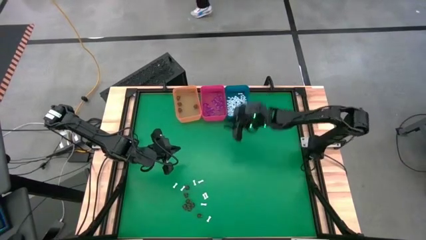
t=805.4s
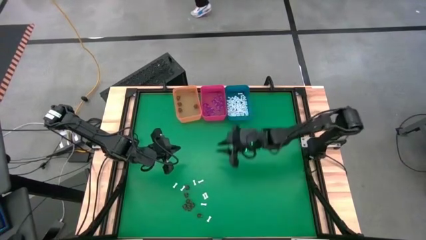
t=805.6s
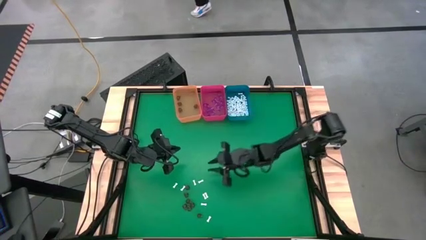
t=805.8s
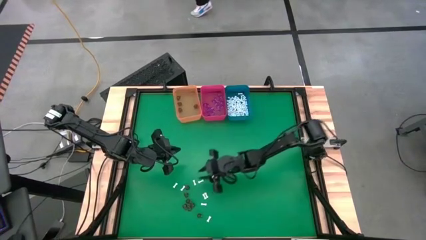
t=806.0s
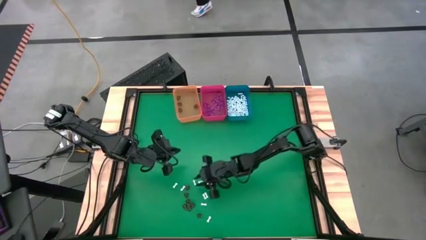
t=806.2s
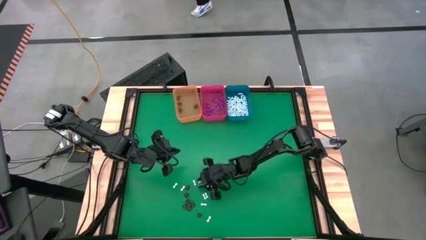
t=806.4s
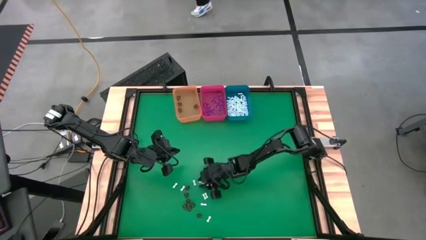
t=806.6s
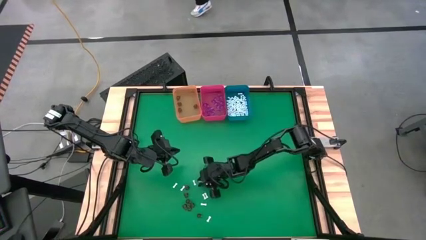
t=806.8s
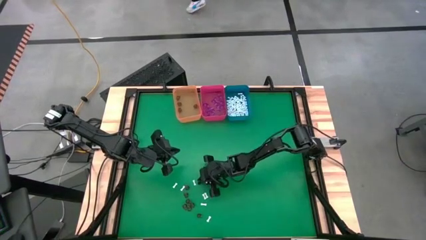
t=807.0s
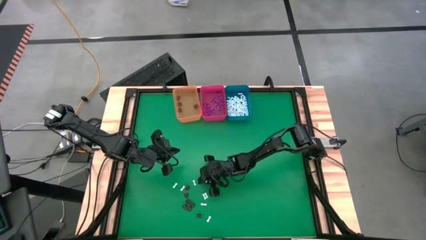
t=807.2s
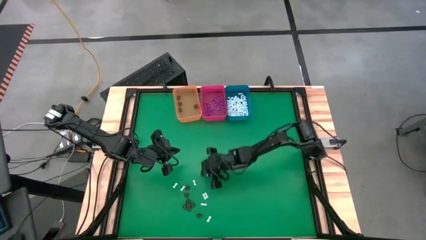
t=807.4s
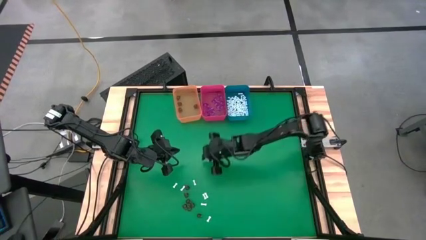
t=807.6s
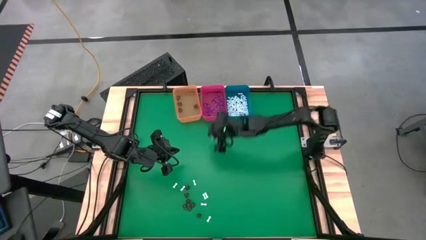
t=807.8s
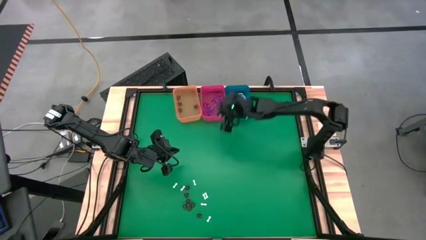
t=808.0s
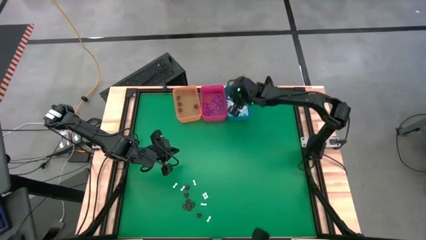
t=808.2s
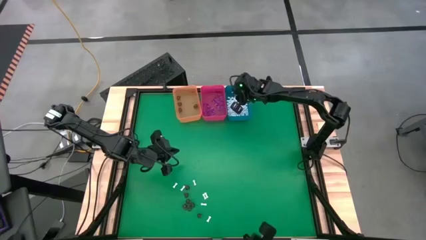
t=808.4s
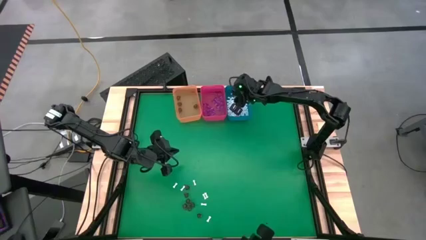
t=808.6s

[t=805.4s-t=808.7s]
Task: Sort Halloween decoration
Put the white bone toy into the blue bin

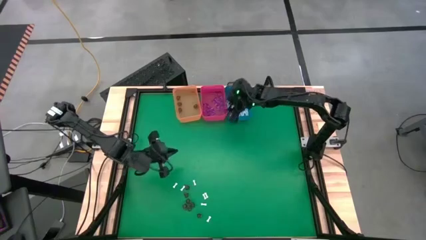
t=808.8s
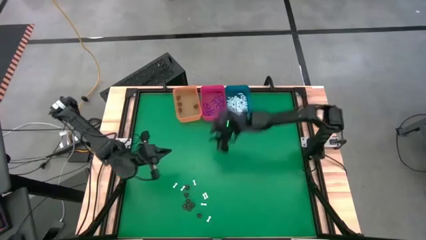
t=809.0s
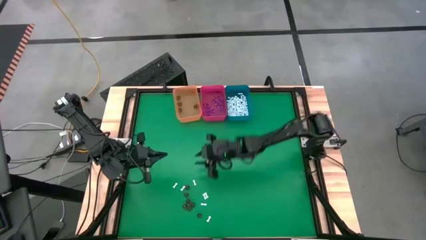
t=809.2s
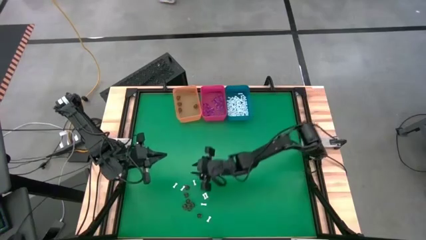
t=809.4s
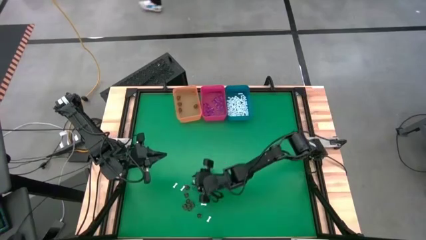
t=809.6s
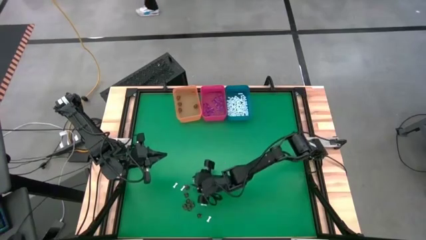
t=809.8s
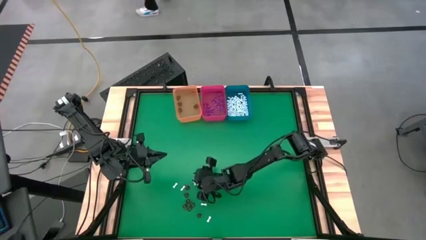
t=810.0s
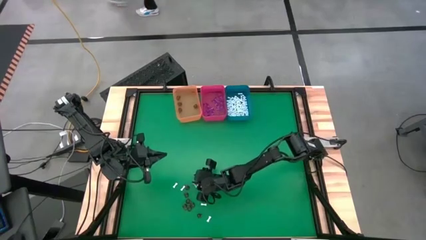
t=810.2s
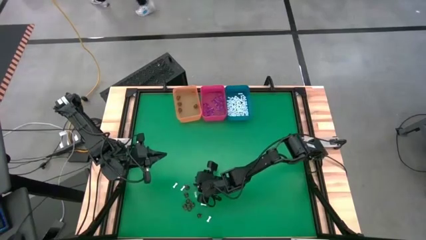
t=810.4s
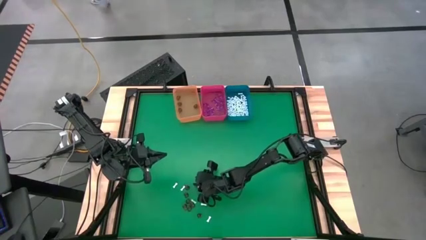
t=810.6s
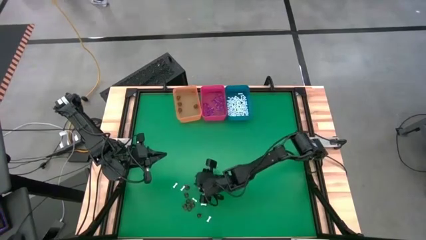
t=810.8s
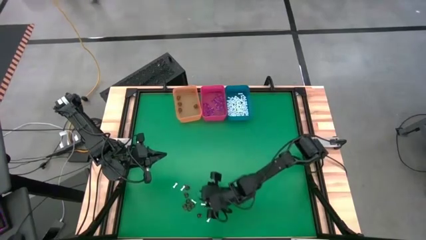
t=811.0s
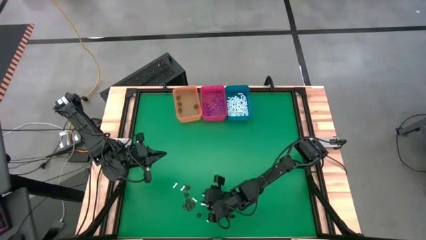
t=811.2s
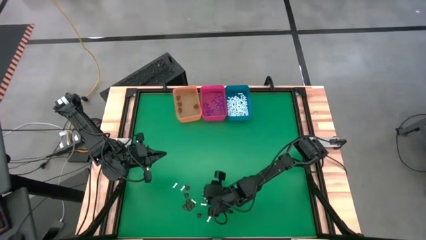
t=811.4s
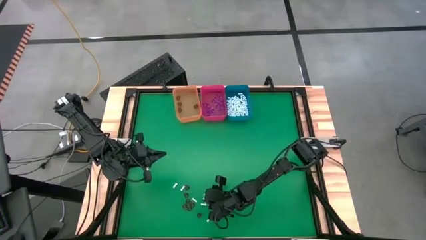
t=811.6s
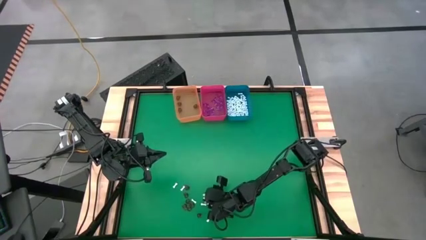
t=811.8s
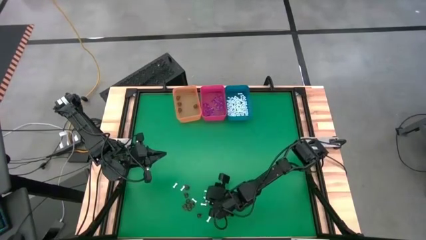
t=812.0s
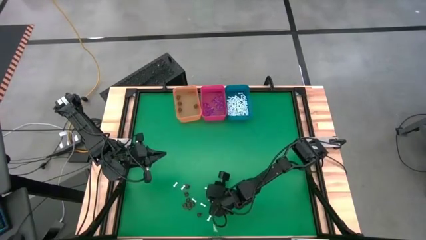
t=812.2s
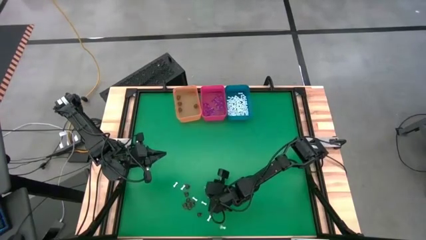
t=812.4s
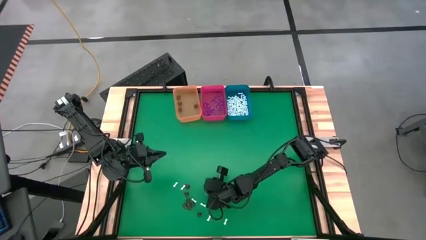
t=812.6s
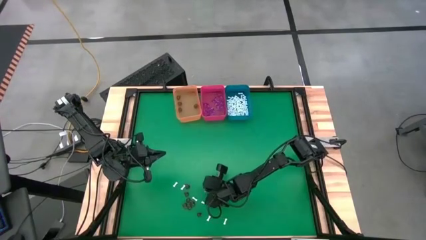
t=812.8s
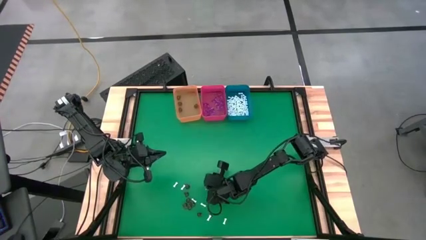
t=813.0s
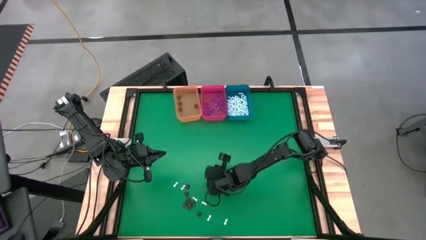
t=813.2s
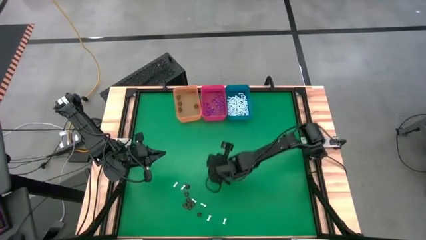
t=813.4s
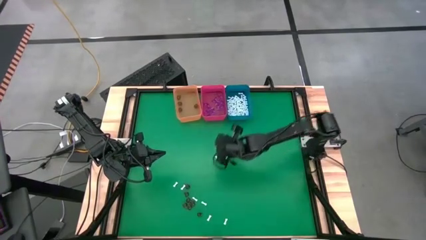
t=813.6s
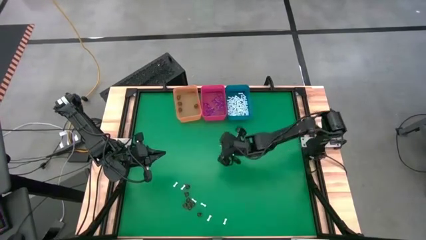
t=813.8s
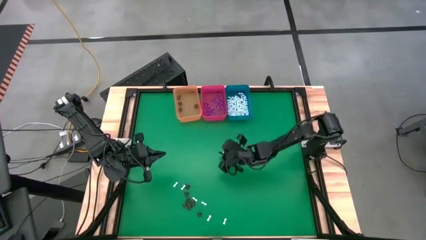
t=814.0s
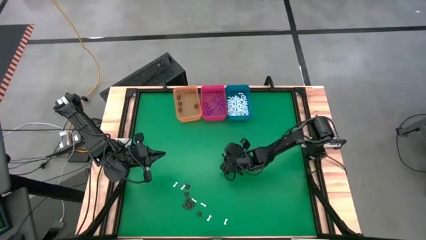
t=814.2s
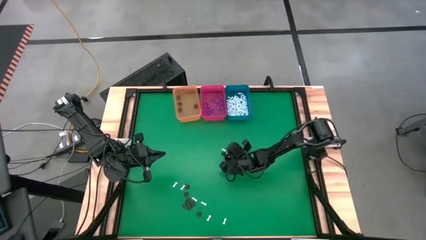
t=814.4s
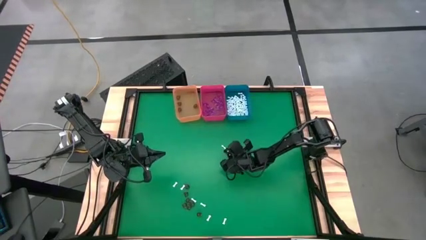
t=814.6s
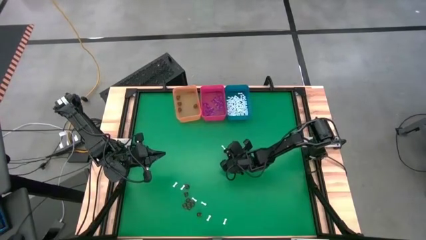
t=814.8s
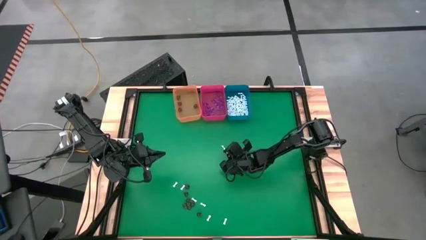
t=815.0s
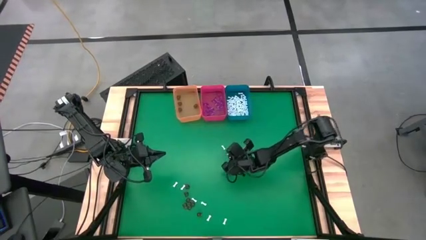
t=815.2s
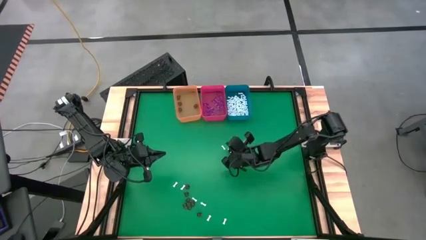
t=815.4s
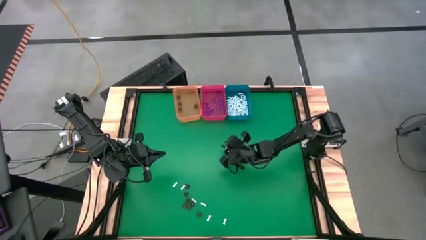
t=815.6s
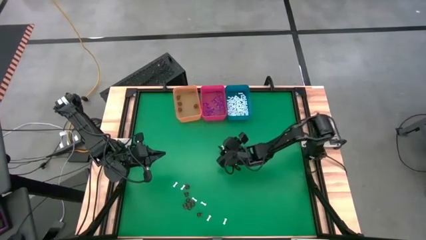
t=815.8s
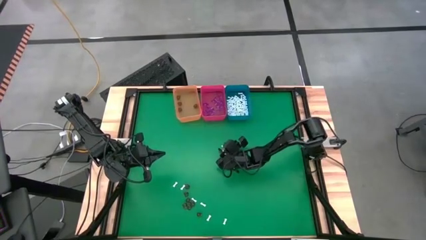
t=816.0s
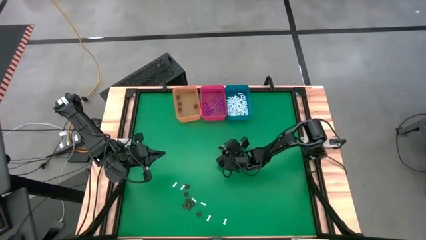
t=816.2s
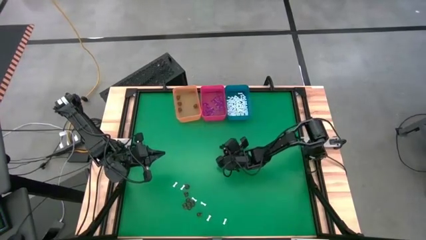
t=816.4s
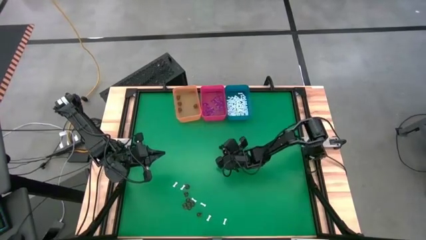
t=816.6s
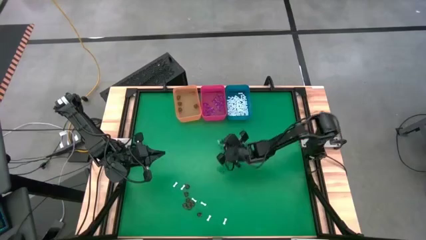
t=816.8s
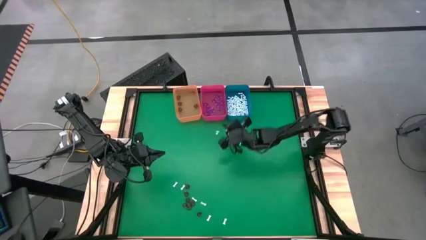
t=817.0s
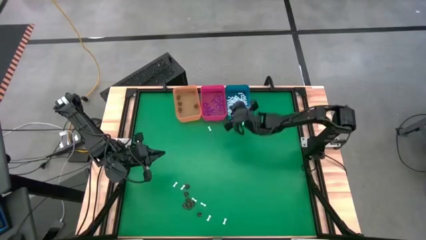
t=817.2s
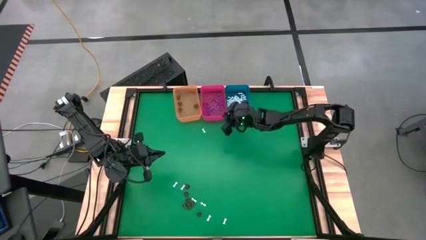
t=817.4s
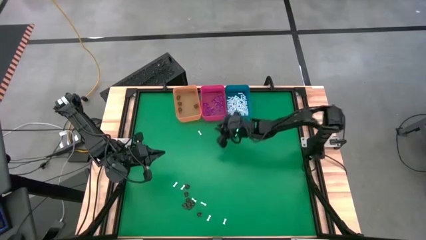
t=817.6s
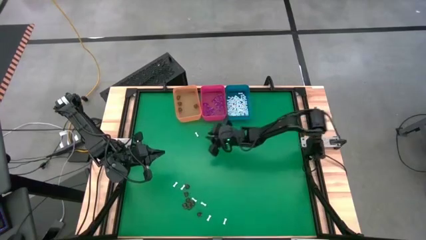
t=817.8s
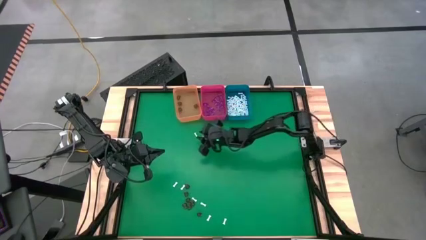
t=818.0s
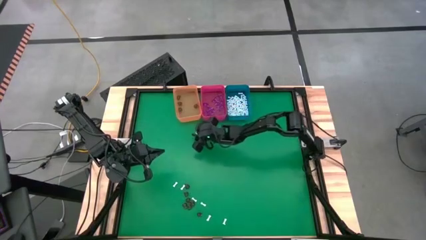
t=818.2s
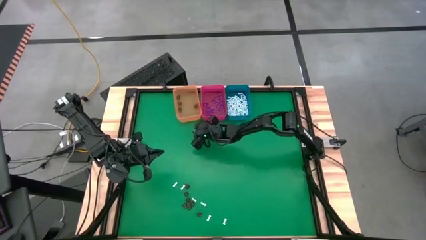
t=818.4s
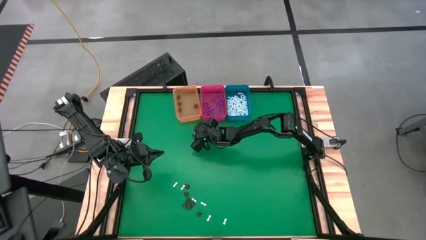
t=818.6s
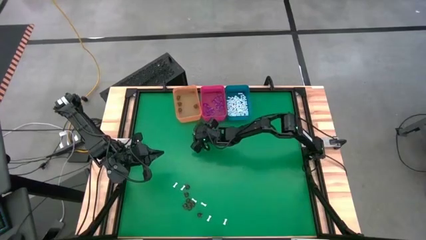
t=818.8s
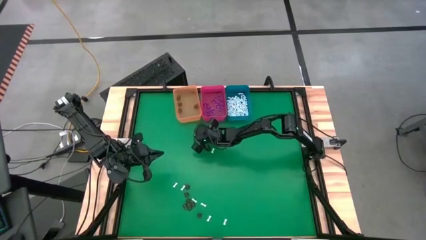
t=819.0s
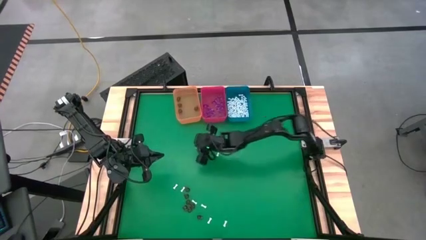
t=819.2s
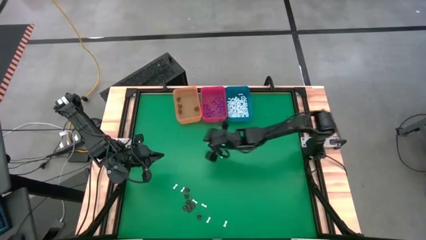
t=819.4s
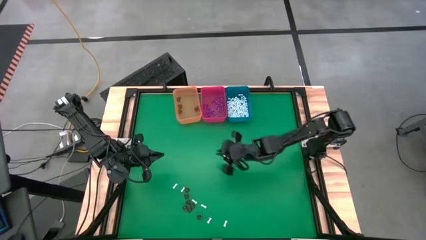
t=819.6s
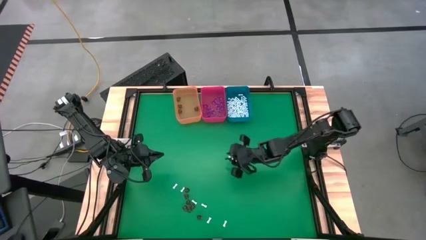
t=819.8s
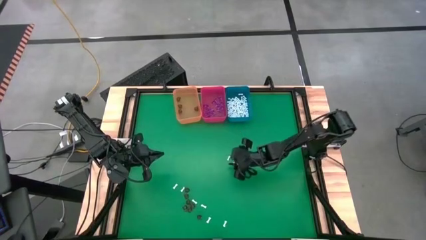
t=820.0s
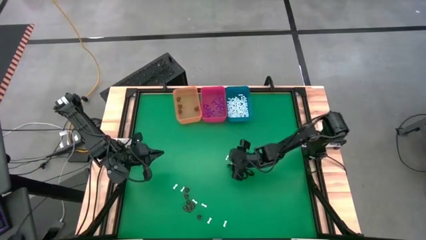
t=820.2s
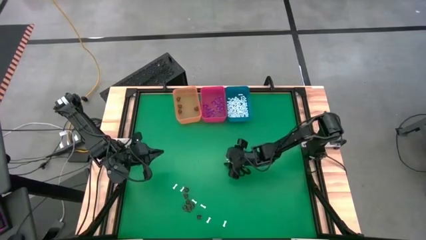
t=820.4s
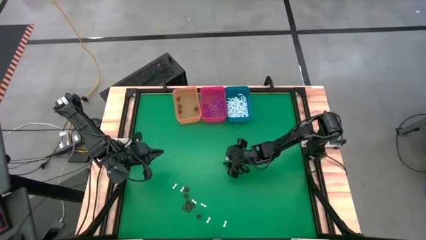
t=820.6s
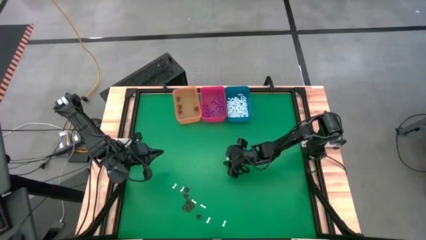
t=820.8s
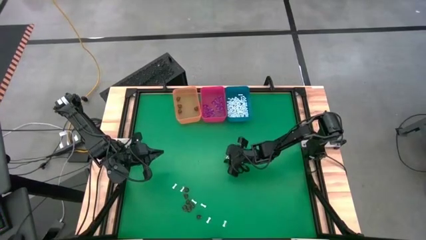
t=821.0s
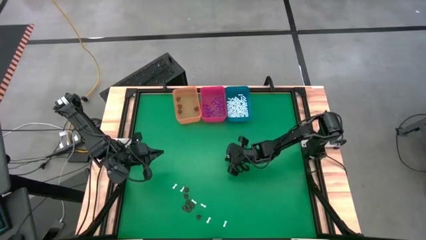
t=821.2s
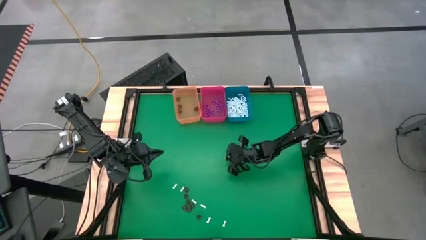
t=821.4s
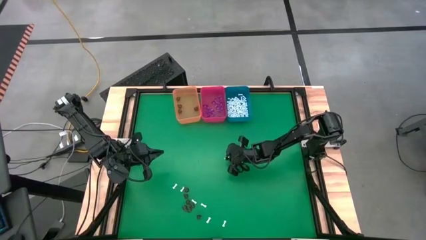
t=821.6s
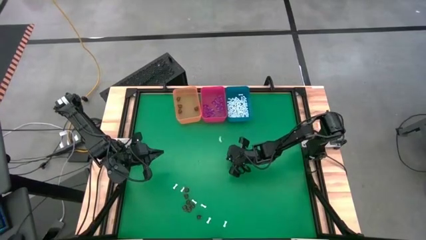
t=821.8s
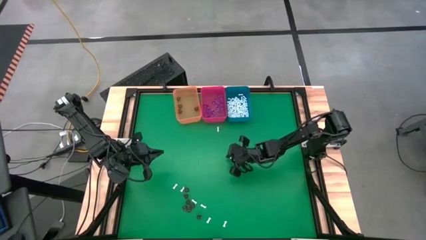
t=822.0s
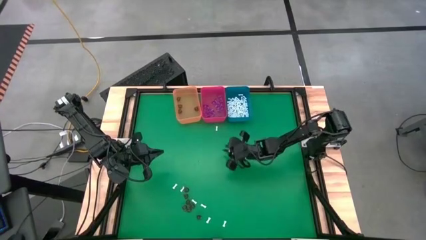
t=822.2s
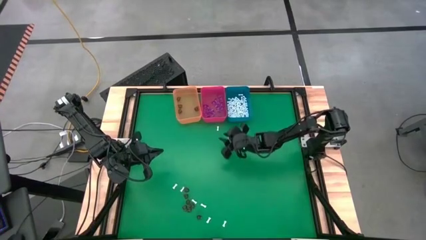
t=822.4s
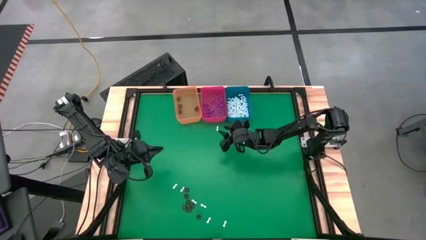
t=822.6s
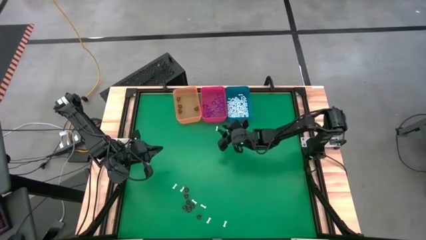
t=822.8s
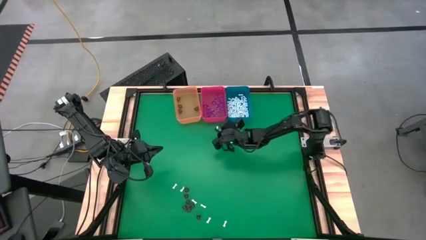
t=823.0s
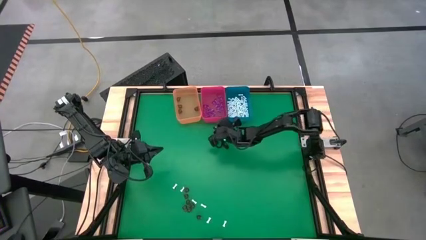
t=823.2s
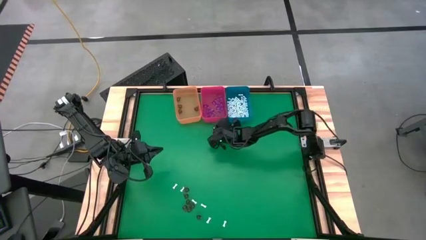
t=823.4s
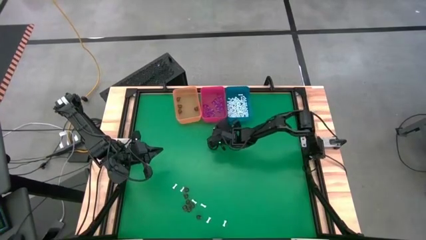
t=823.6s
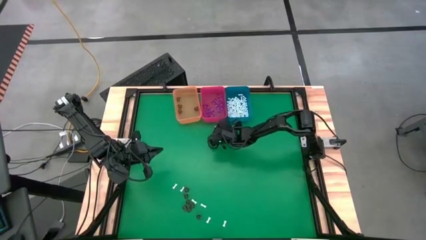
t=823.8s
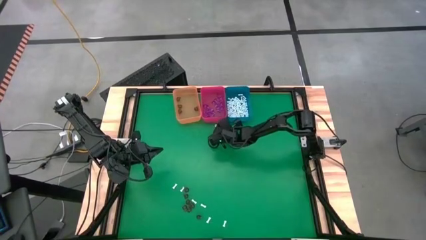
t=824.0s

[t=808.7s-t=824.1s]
Put the white bone toy into the blue bin
